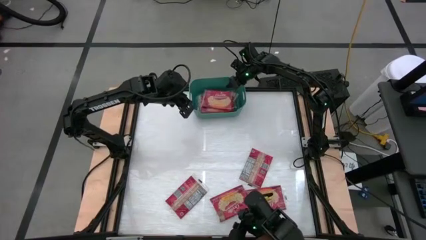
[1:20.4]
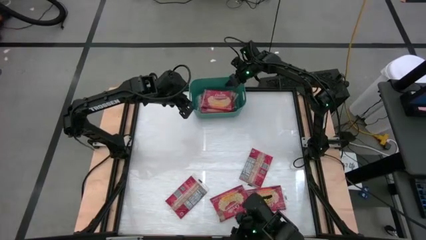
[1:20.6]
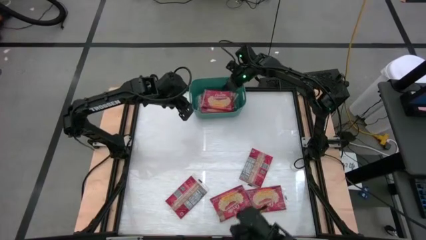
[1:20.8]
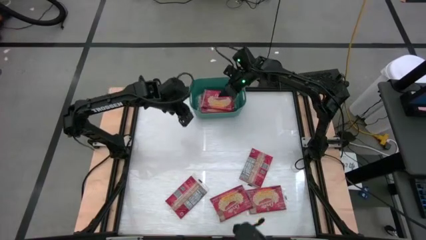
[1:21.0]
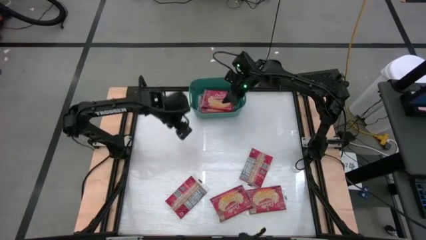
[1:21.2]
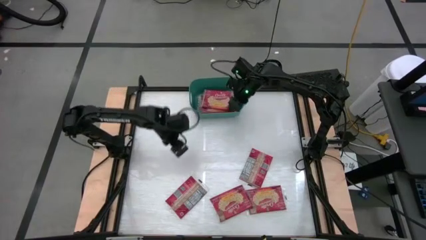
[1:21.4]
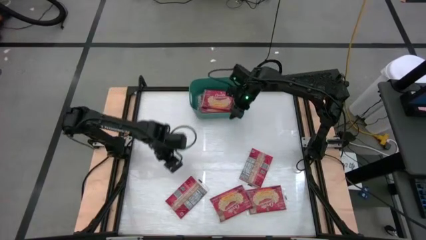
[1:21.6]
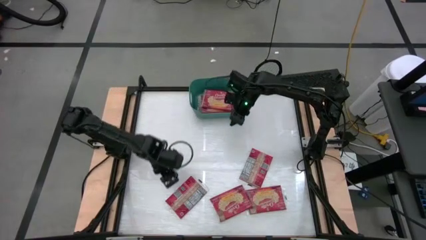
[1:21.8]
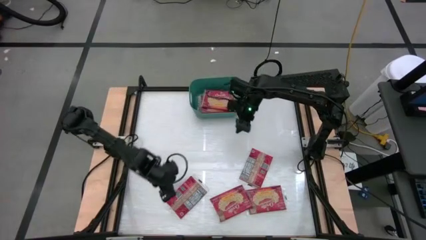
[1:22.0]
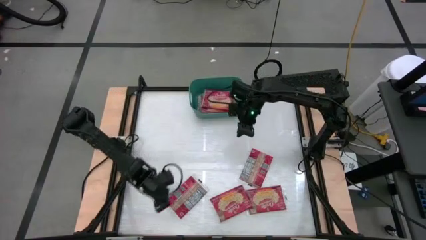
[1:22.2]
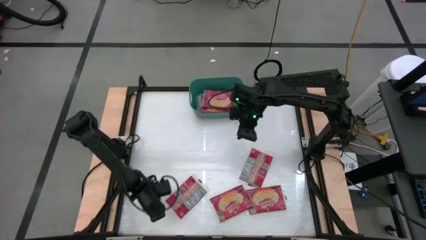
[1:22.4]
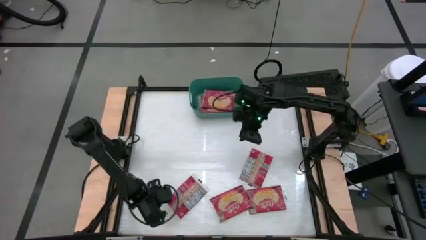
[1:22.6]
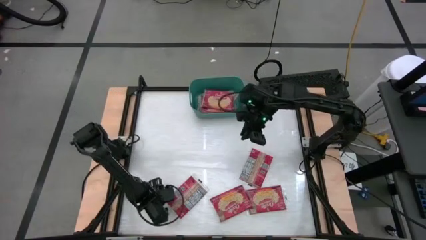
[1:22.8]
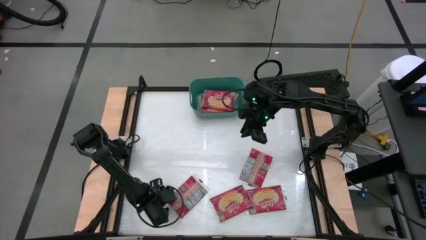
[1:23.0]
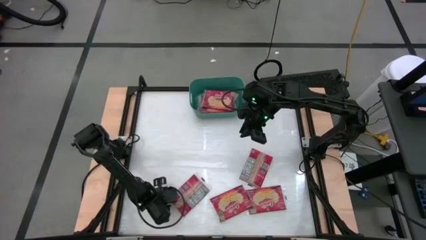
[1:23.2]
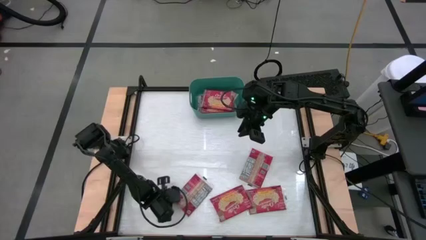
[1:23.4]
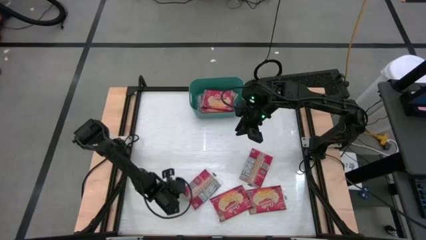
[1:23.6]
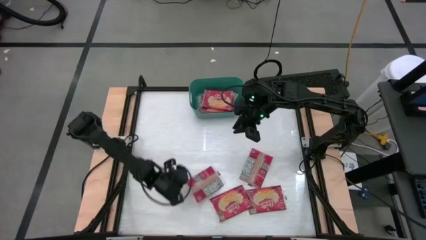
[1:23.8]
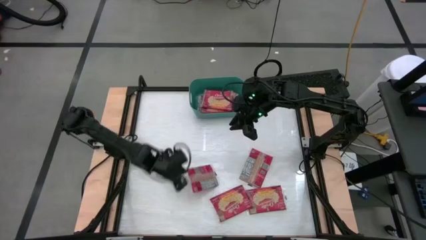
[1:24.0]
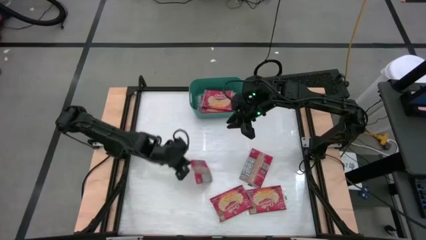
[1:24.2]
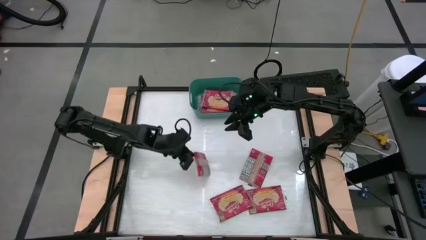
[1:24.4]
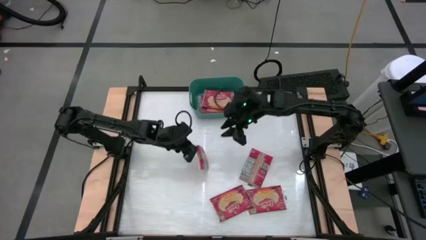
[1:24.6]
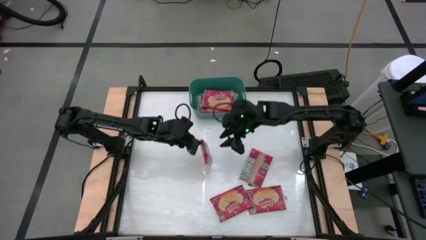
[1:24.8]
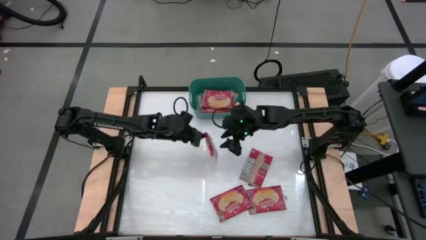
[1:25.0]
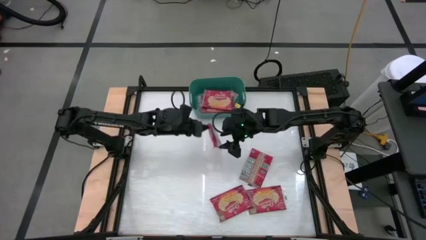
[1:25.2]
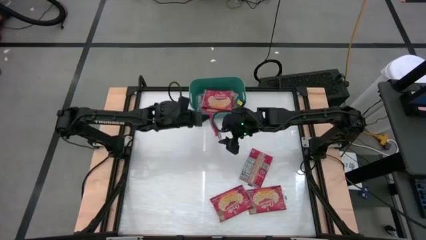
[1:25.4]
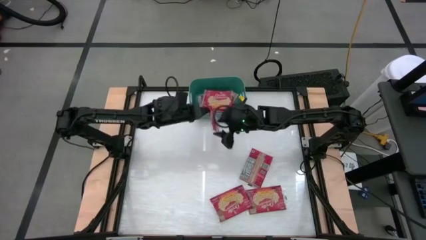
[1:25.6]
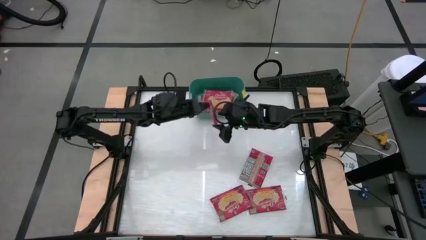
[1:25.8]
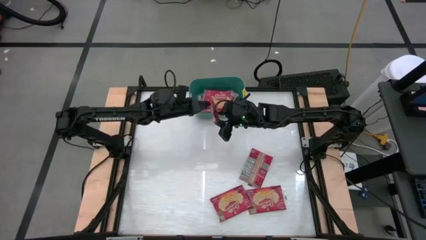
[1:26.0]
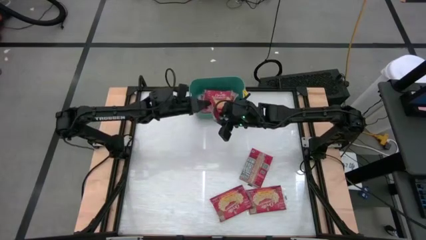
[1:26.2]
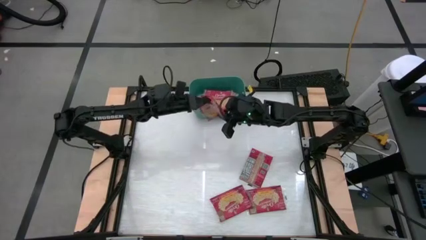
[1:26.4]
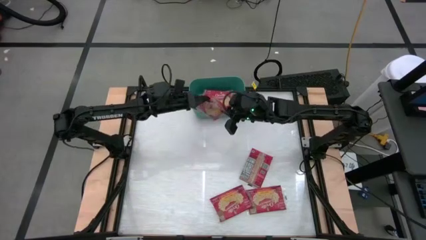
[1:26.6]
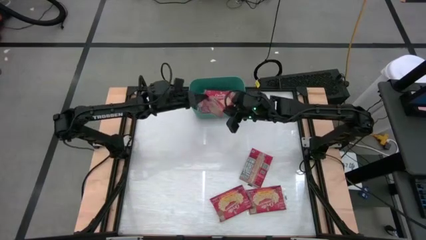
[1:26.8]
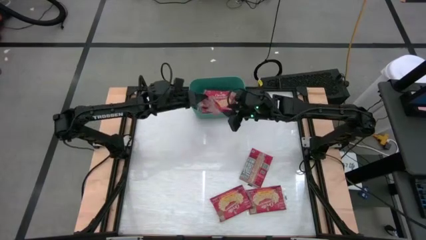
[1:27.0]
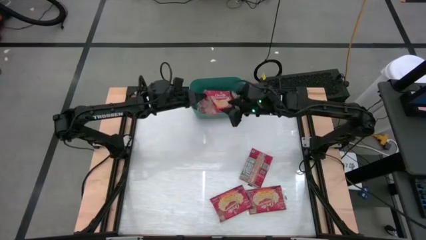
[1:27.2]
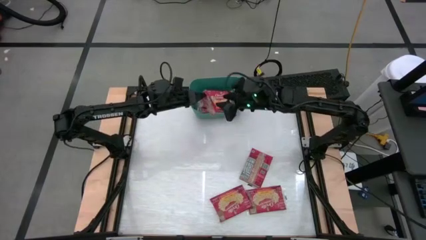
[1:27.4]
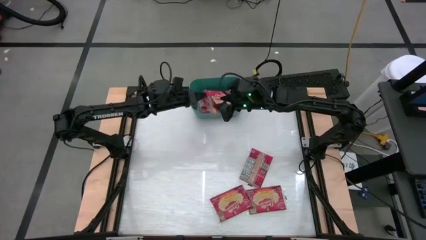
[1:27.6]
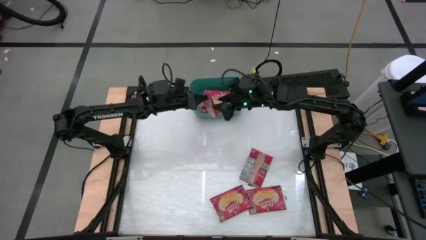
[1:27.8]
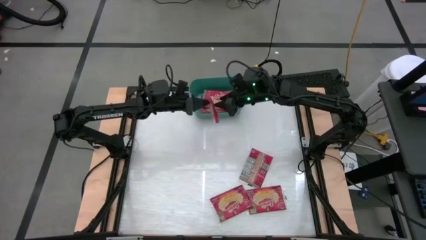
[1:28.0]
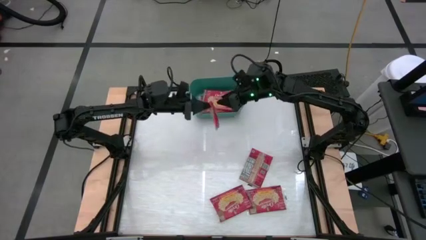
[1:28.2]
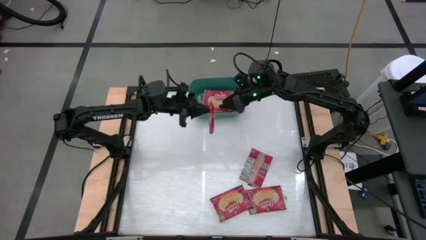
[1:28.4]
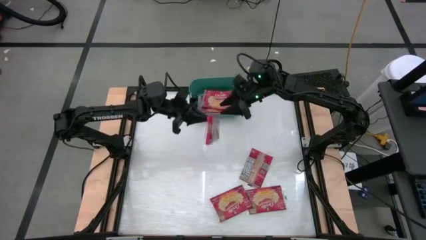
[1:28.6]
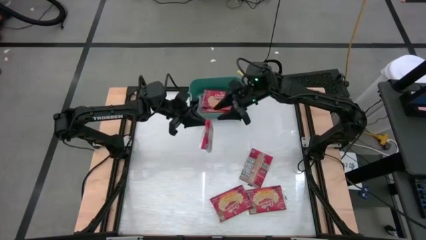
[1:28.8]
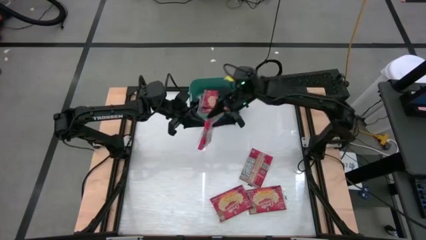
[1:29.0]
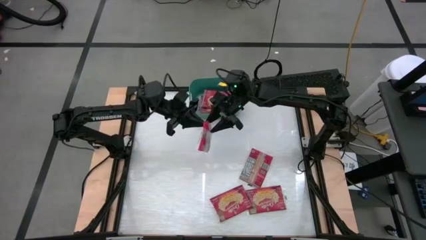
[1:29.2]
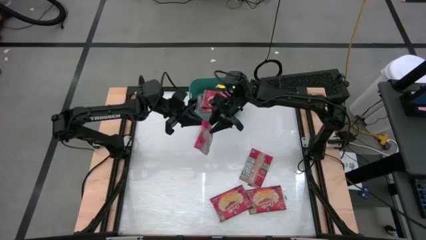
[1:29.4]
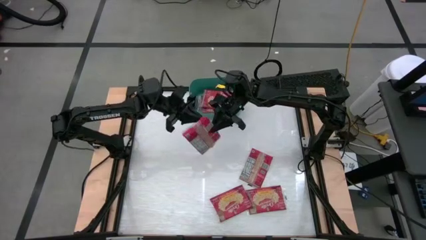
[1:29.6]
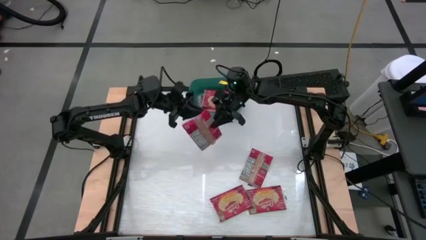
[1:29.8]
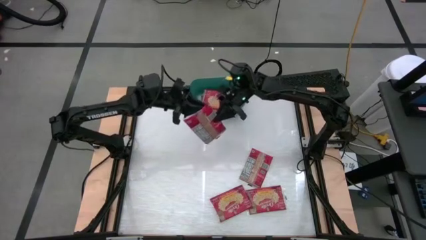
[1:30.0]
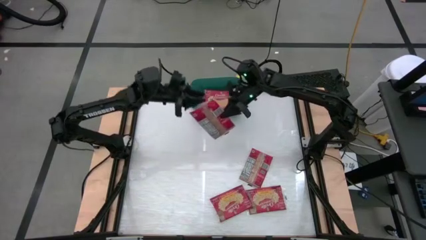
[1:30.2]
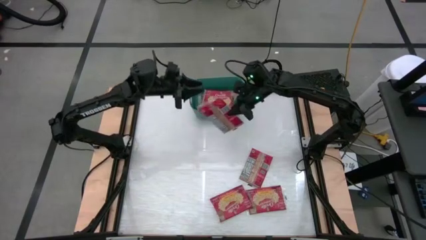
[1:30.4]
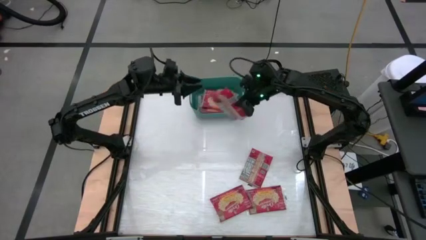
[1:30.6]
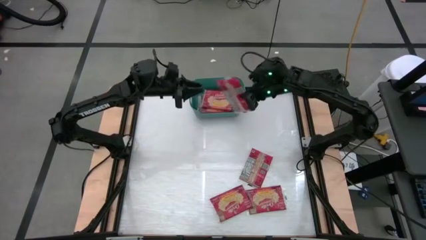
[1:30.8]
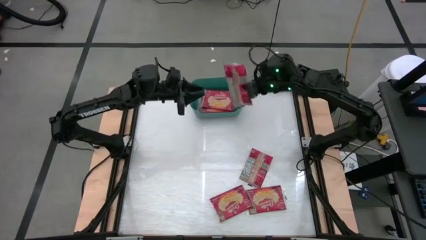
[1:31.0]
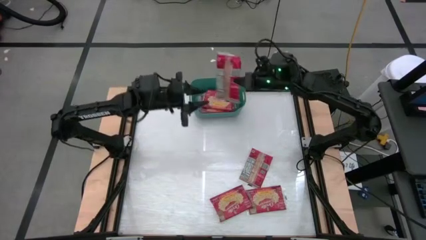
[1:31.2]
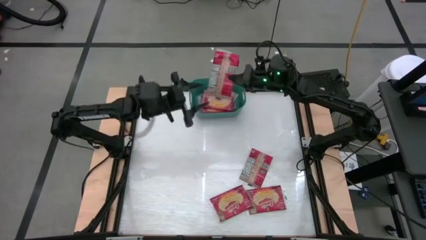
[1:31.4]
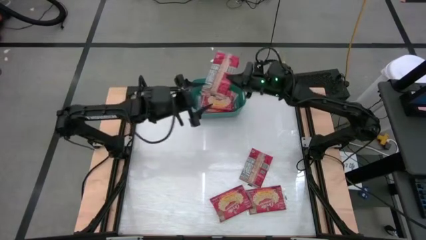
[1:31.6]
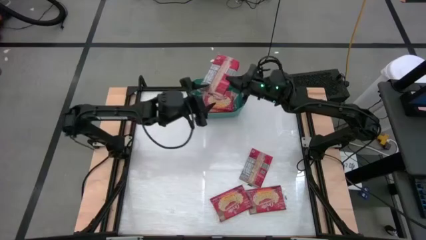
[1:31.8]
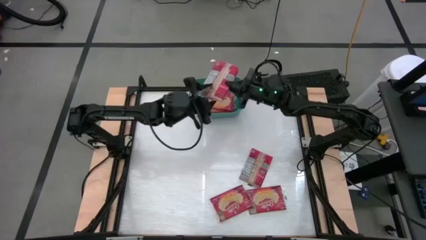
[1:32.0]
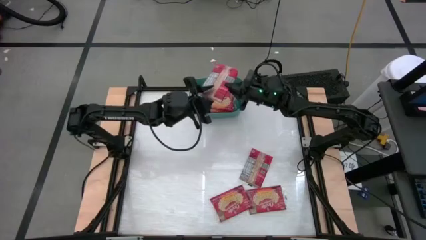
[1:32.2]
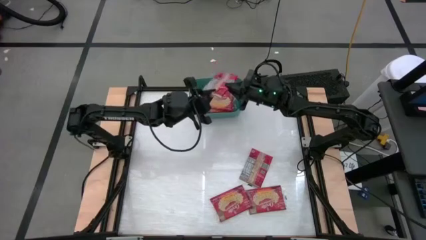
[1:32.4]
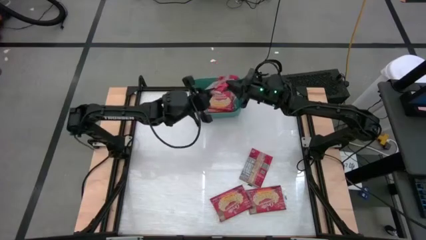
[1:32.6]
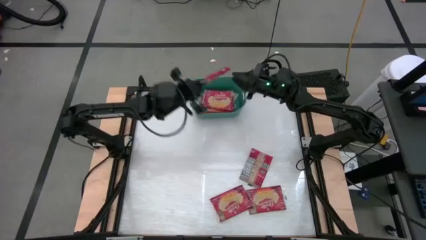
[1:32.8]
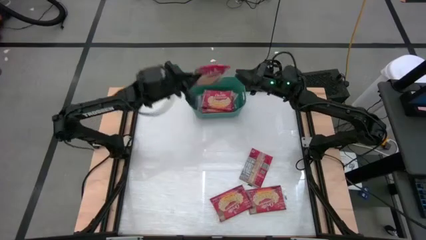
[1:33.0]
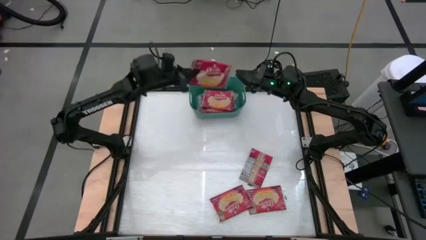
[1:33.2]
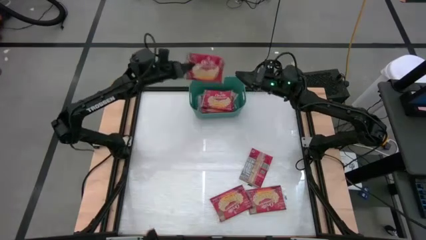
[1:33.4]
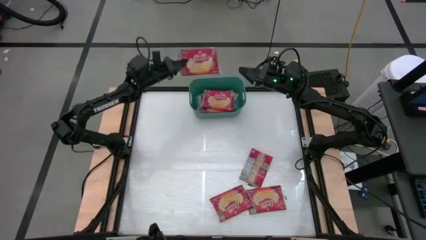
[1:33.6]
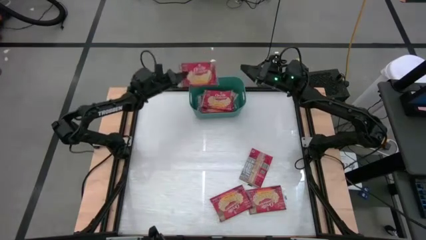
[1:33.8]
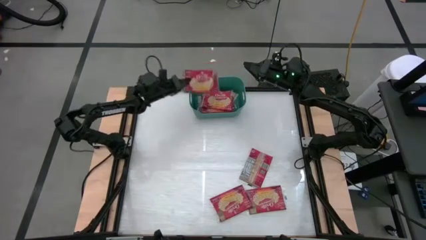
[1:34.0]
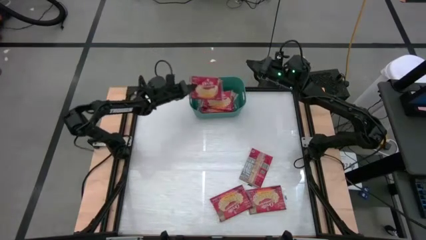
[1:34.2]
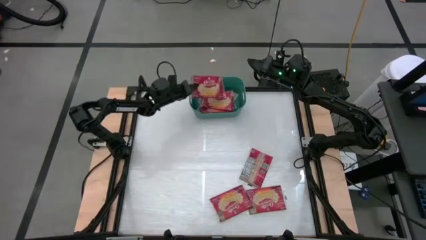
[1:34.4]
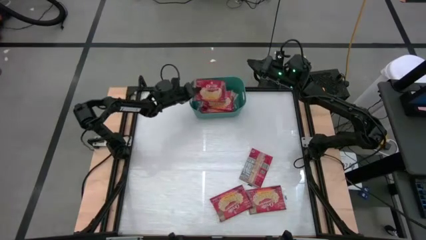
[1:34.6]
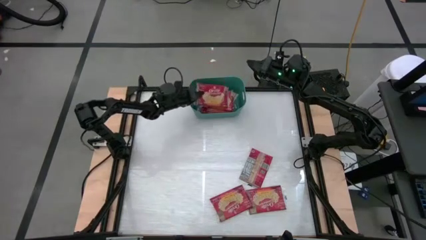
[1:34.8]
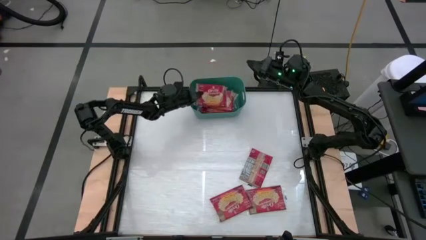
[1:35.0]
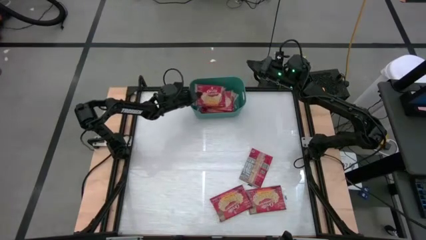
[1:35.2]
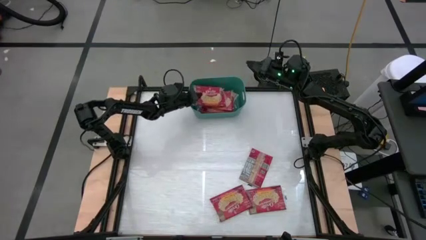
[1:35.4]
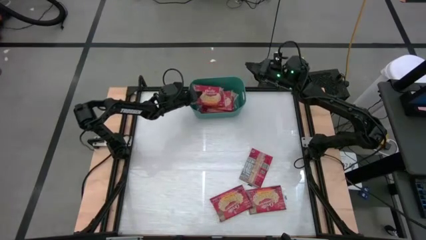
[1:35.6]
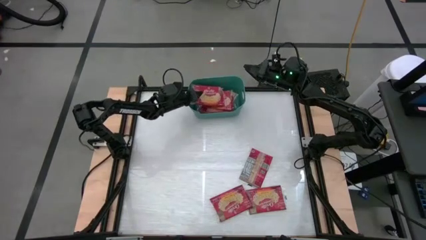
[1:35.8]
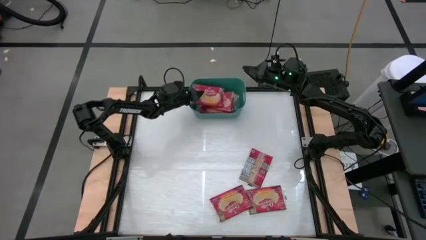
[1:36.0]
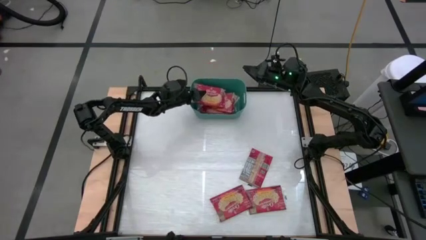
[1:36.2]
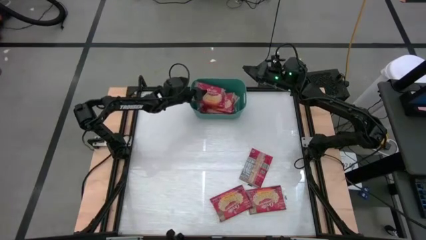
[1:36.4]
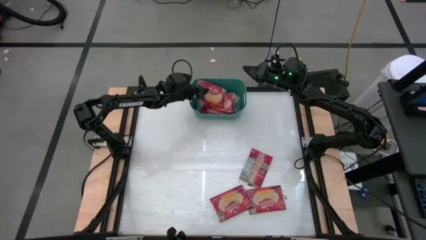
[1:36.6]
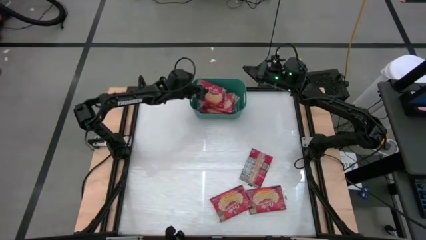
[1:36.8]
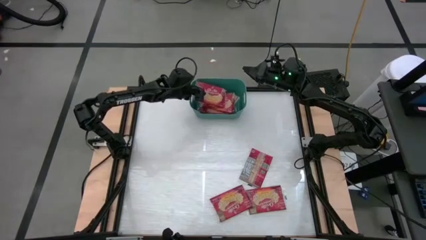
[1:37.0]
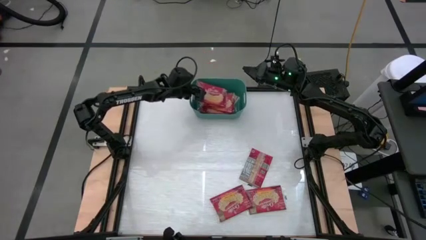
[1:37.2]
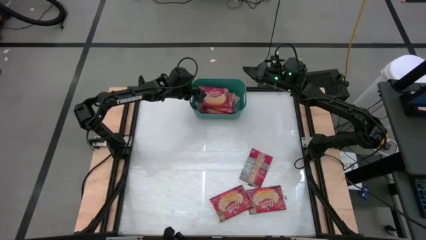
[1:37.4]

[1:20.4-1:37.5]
Task: Sort popcorn bags into baskets
Put the red popcorn pack into the green bin
